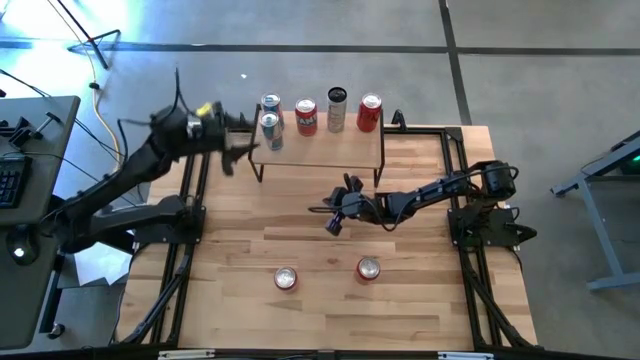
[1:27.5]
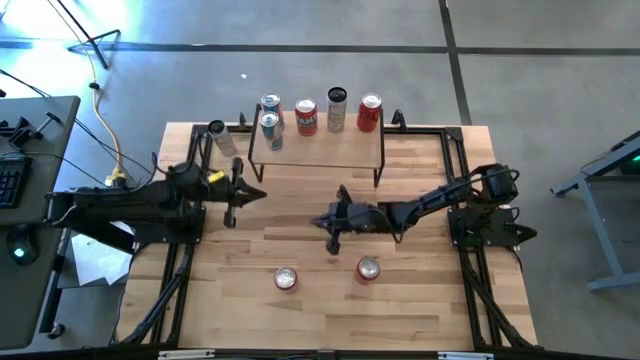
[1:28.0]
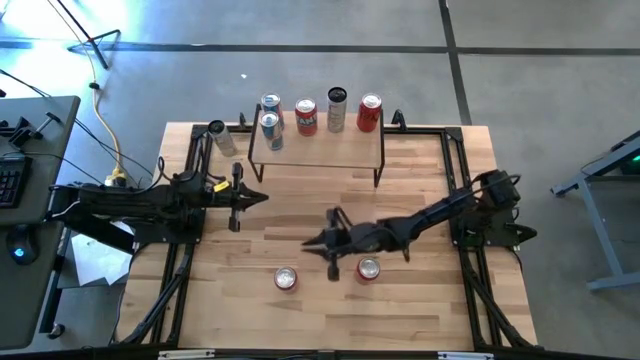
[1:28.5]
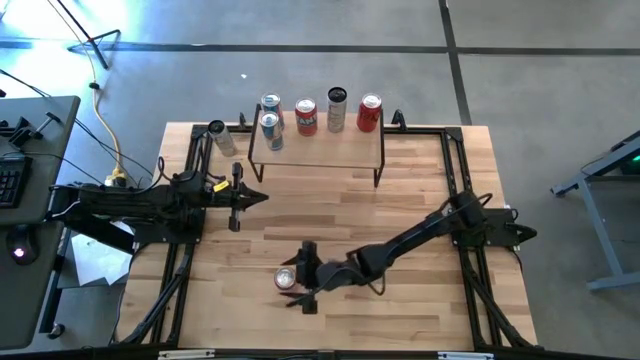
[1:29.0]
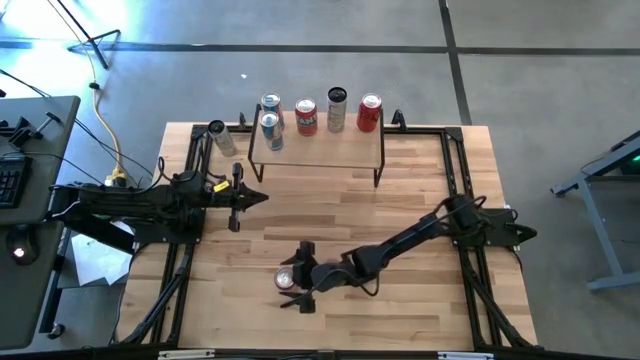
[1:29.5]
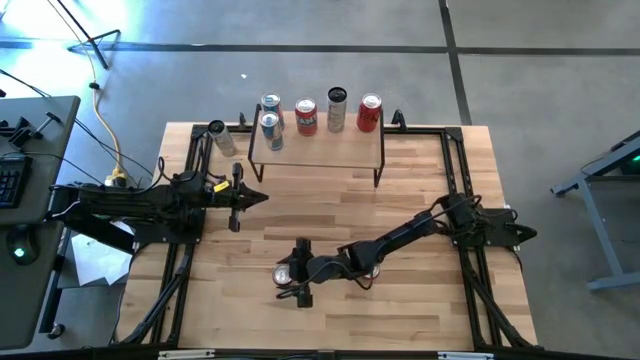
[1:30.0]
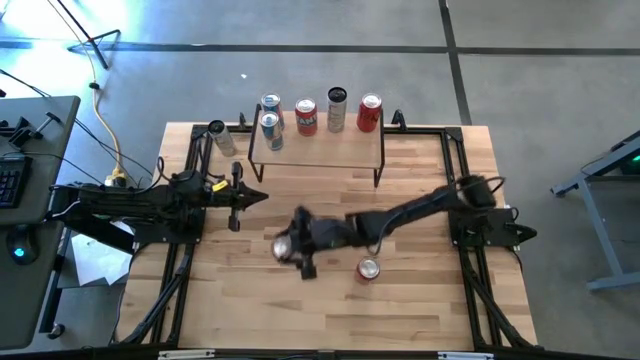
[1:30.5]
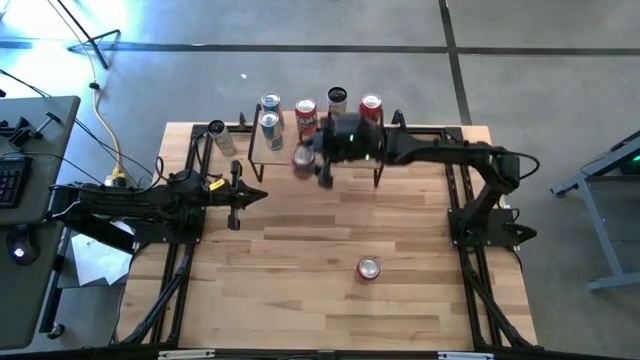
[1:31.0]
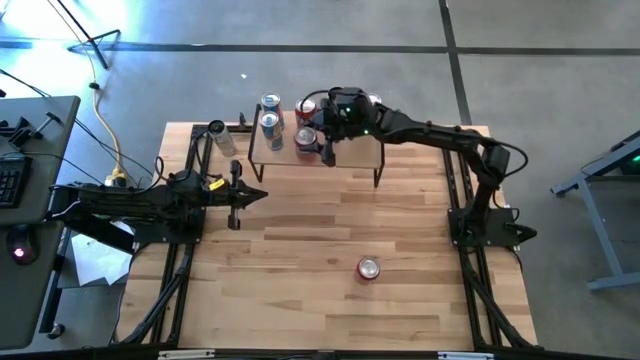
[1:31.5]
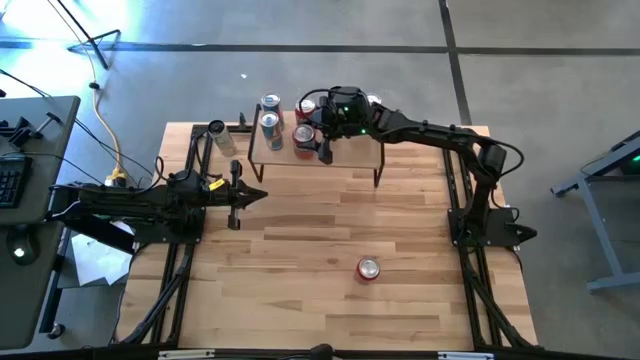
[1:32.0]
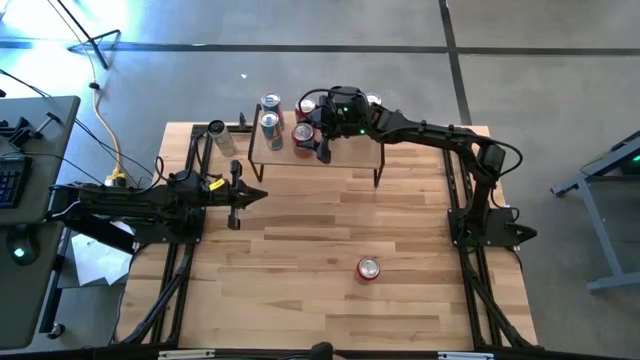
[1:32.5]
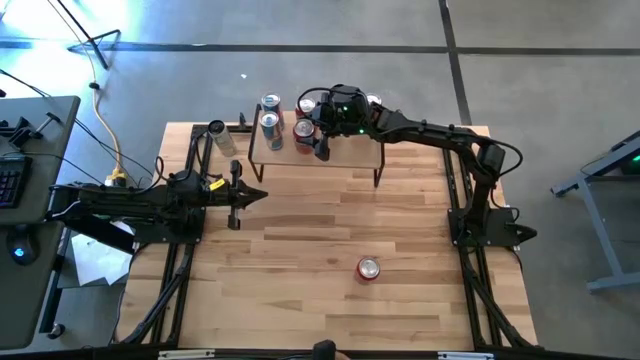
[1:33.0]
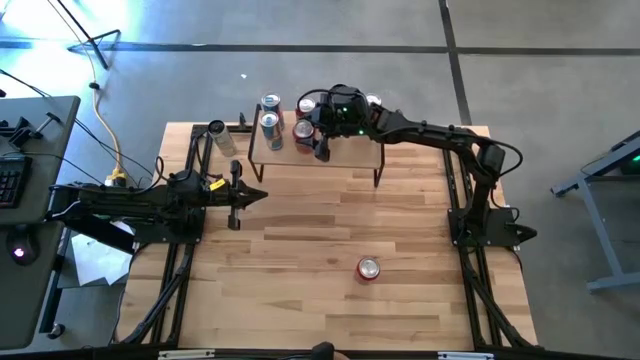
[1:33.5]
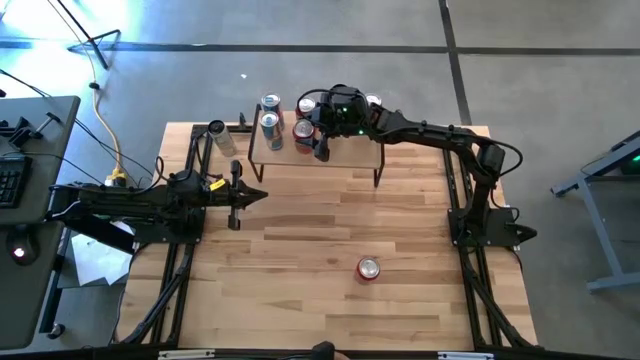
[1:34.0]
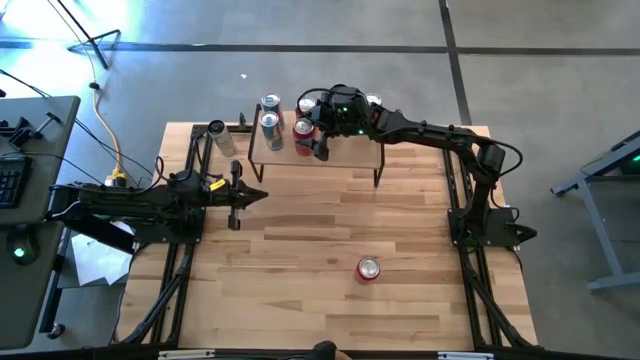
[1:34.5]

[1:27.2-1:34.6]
Task: Place canned beverage on shelf
Put the red soda can on the shelf aligned with the other red soda can

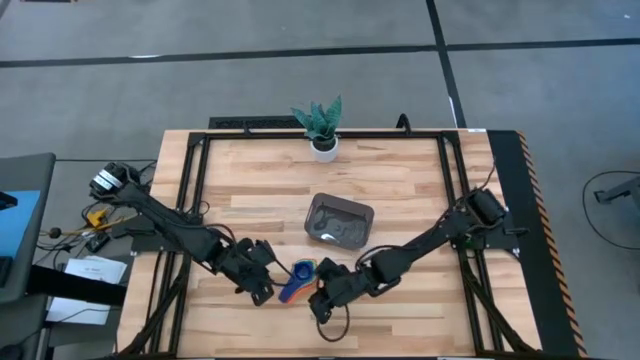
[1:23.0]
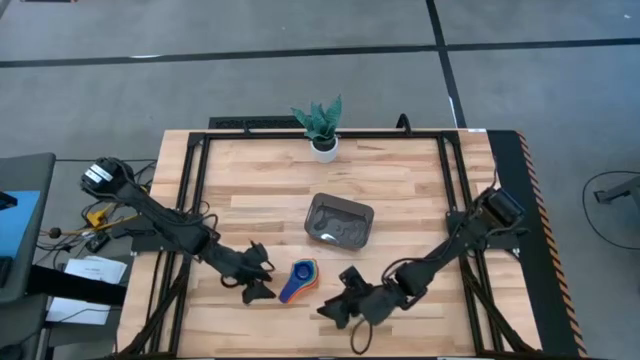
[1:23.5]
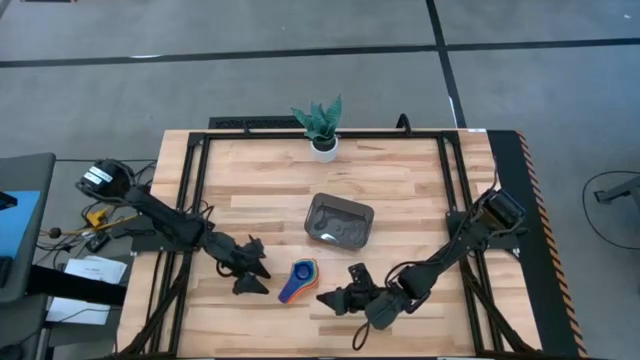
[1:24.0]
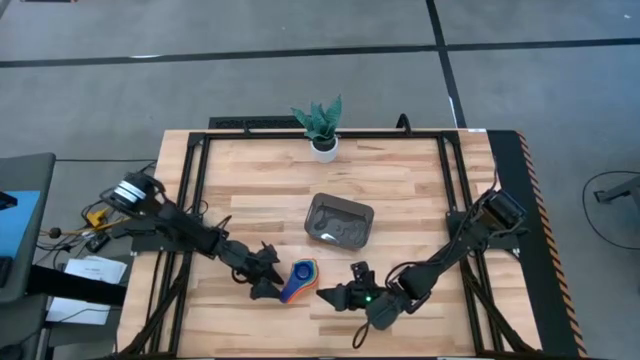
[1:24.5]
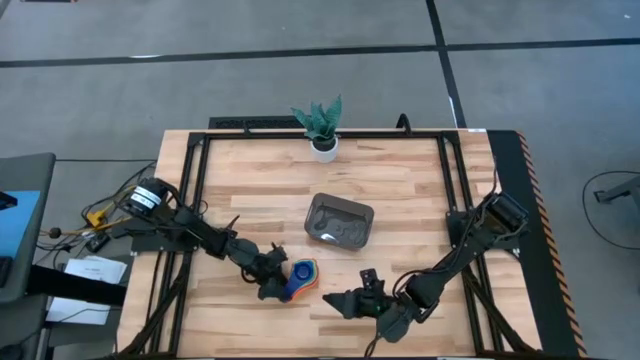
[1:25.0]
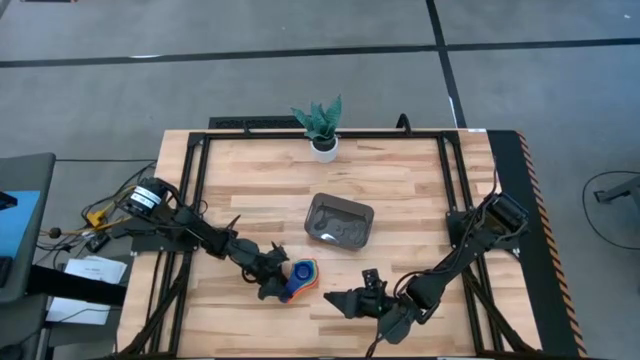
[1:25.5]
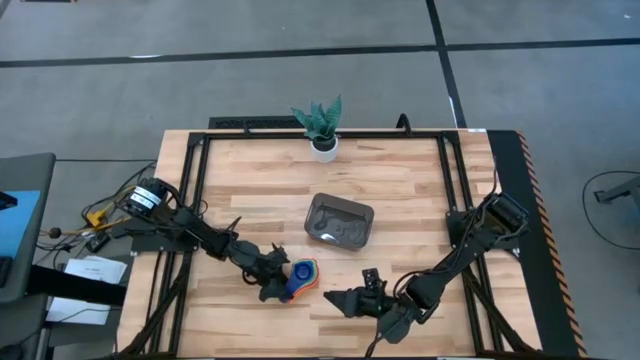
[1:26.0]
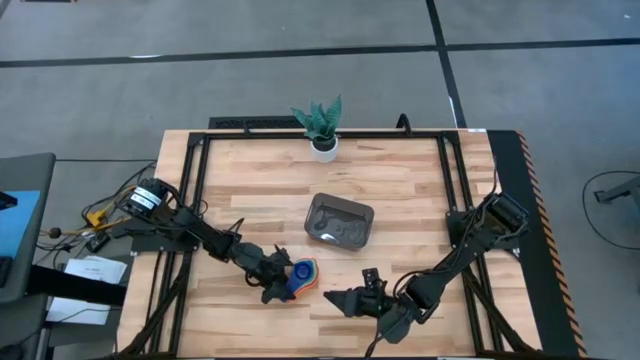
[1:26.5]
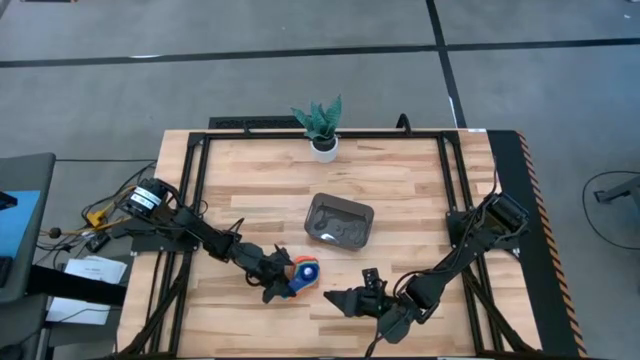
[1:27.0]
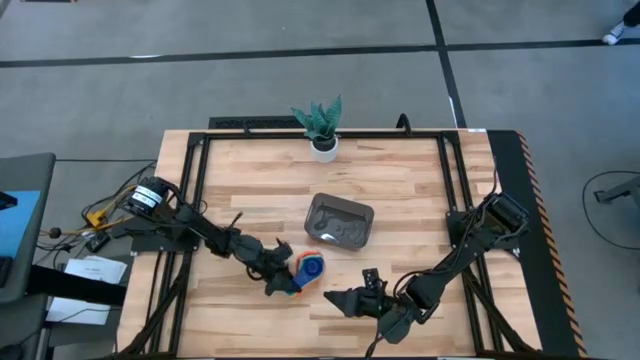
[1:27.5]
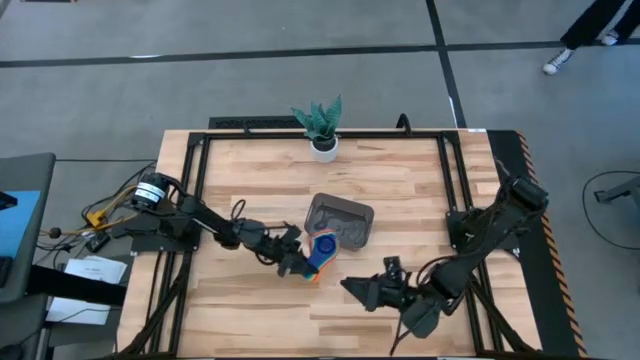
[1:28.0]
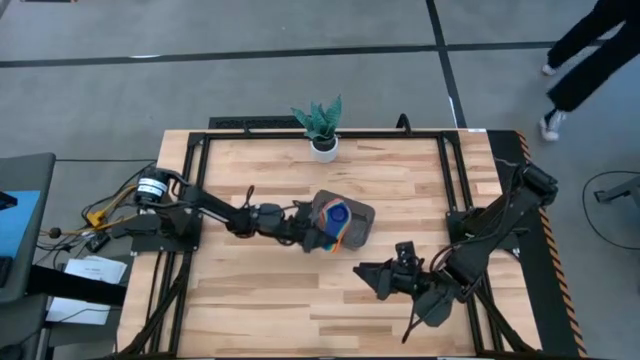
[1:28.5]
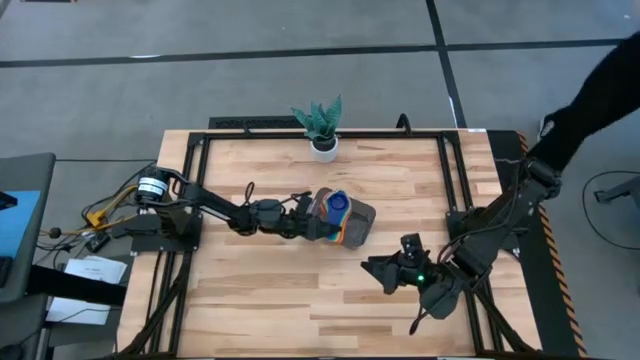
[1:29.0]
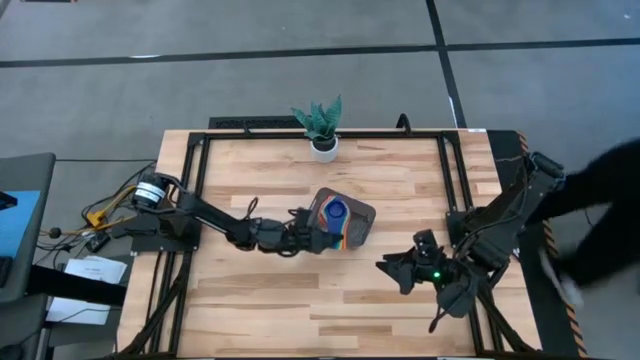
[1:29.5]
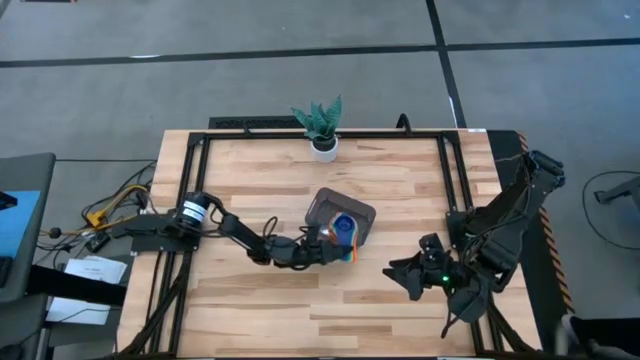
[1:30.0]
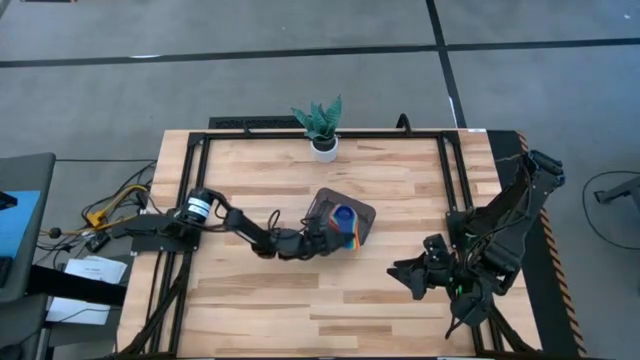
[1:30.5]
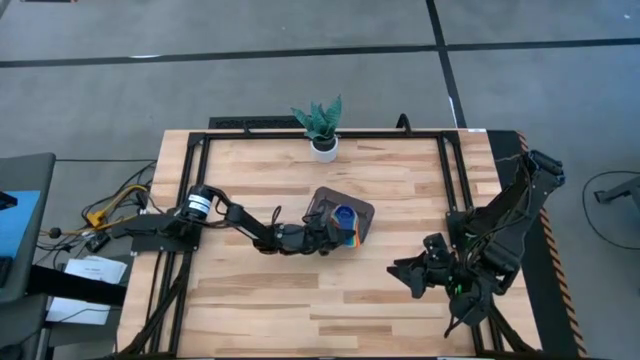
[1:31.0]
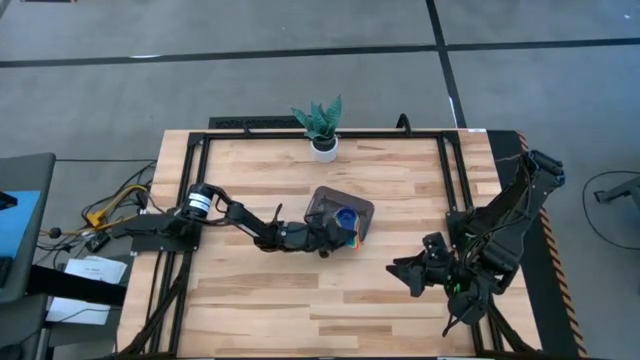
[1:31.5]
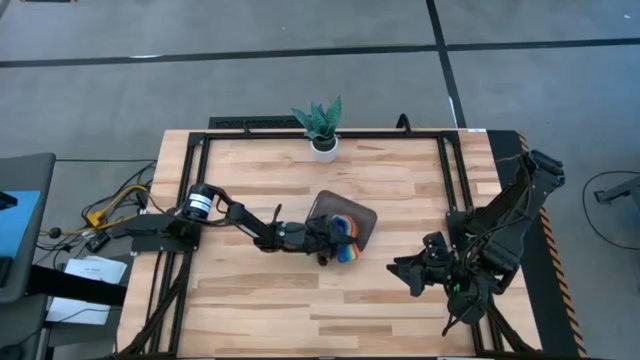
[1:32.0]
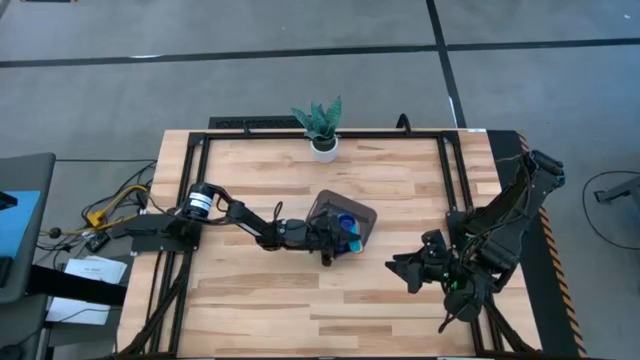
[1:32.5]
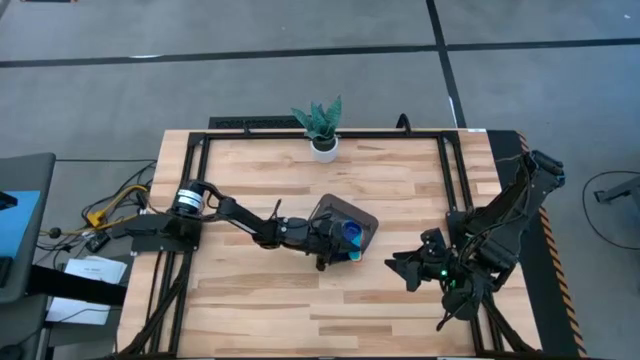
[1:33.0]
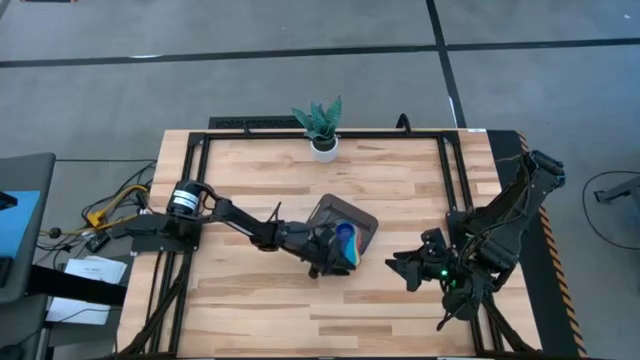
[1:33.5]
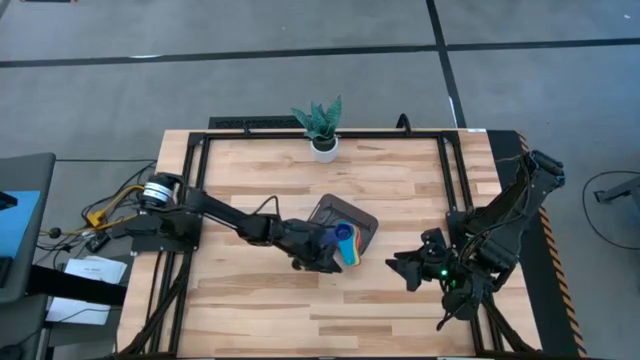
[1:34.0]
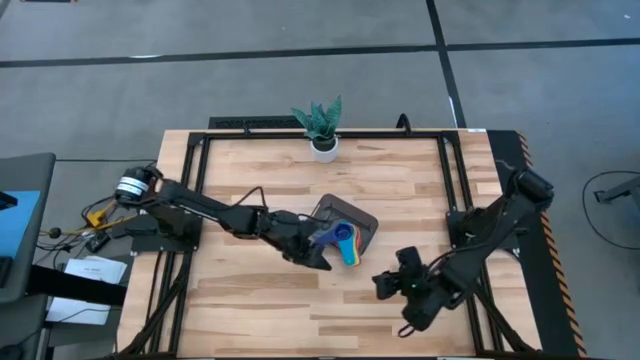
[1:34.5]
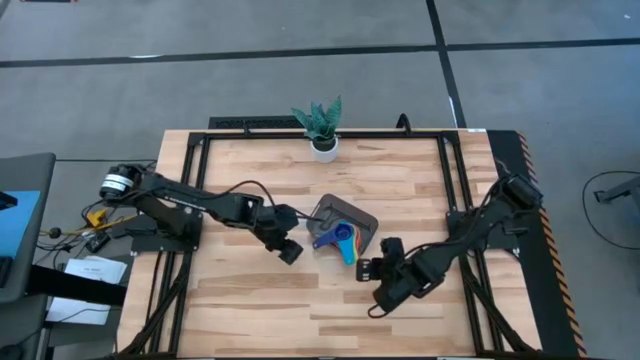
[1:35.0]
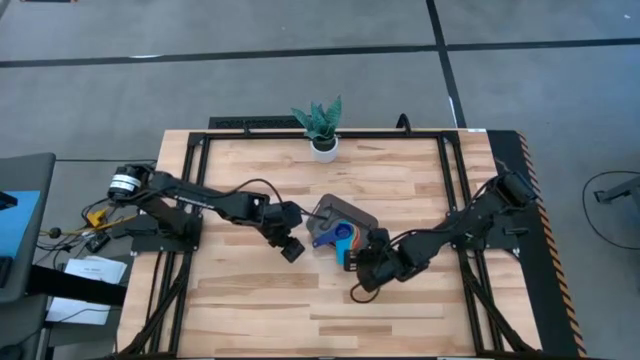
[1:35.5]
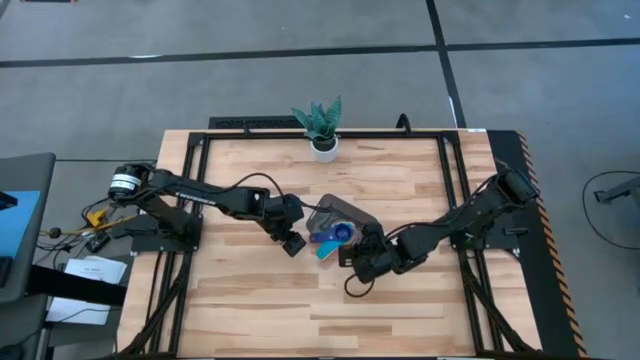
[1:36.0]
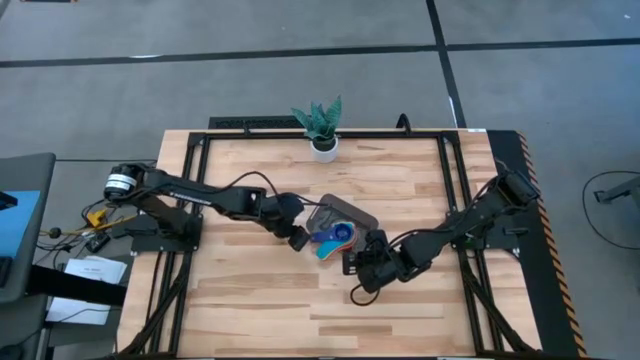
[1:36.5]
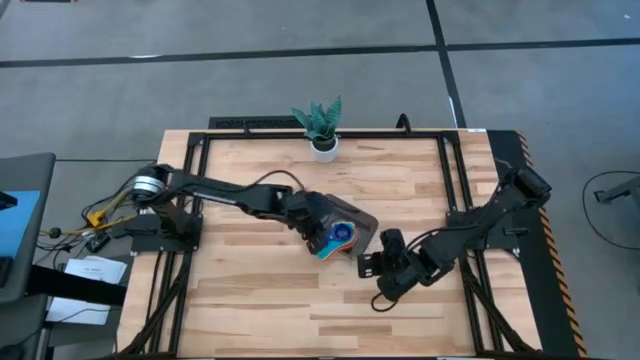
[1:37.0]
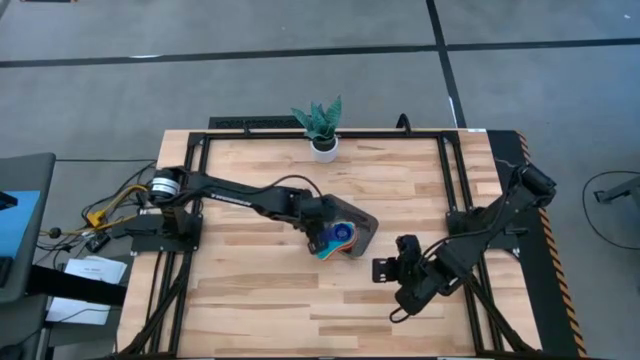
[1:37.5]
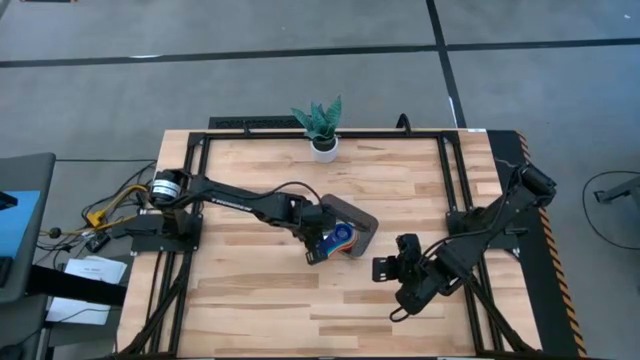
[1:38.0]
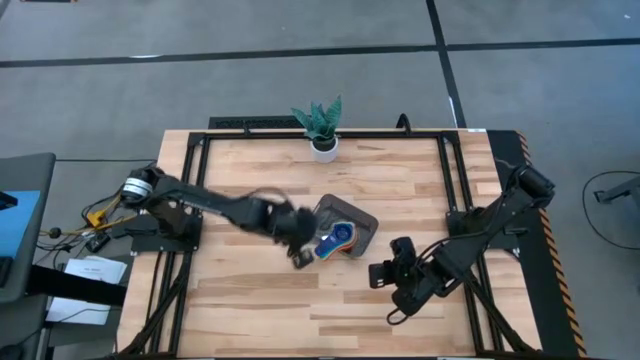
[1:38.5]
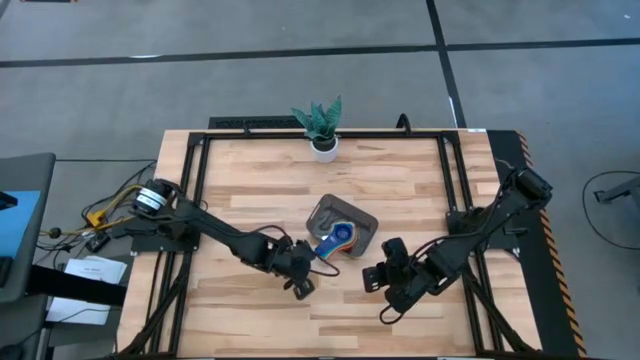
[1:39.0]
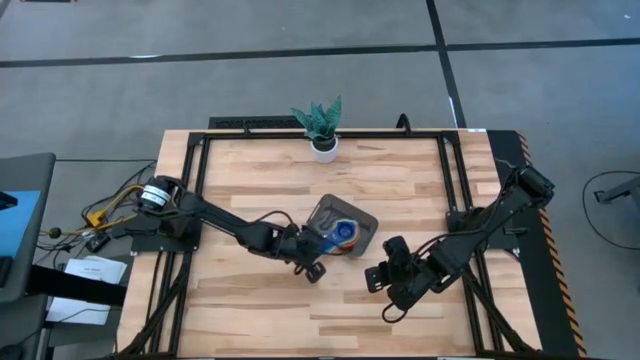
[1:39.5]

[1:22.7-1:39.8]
Task: Nest measuring cups in basket
Put the stacked measuring cups into the black bin
